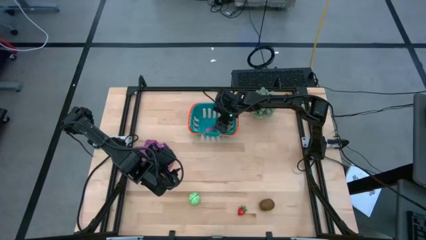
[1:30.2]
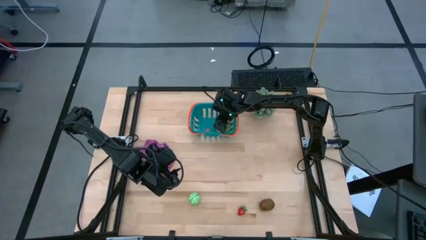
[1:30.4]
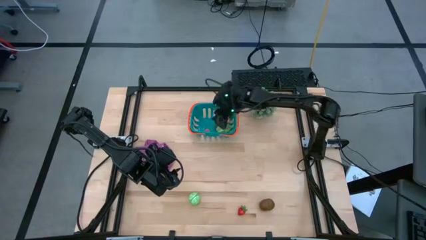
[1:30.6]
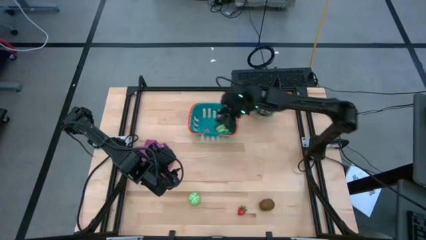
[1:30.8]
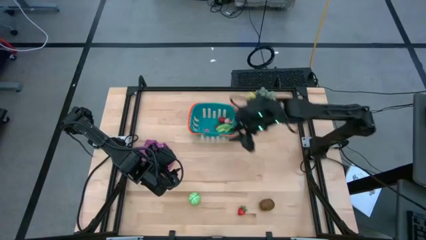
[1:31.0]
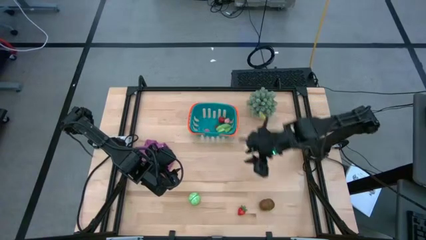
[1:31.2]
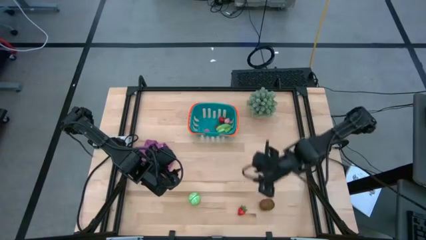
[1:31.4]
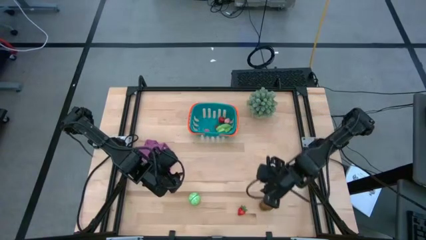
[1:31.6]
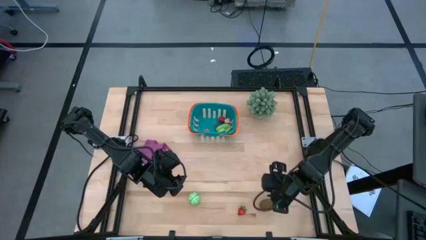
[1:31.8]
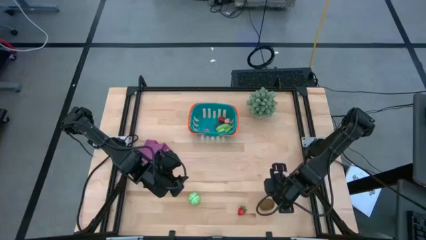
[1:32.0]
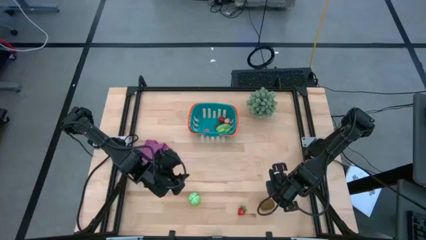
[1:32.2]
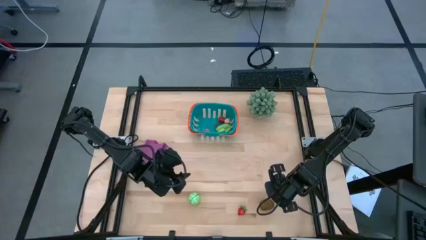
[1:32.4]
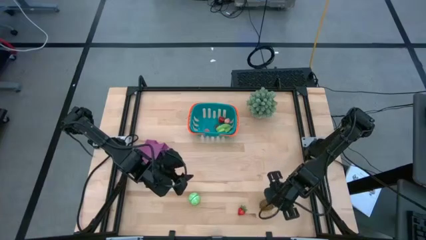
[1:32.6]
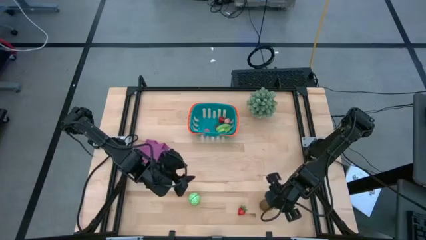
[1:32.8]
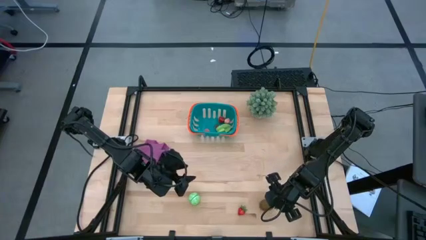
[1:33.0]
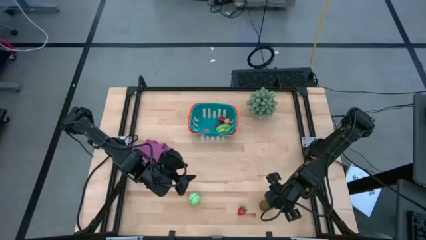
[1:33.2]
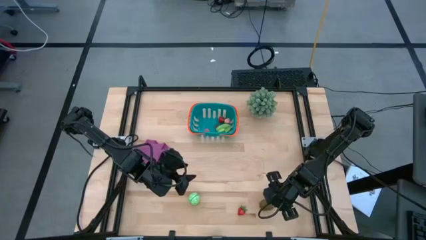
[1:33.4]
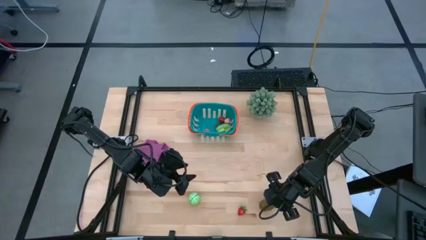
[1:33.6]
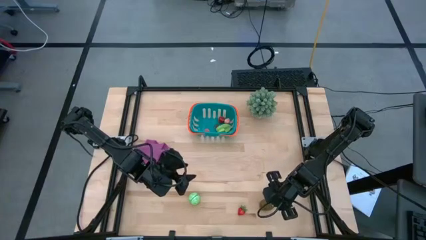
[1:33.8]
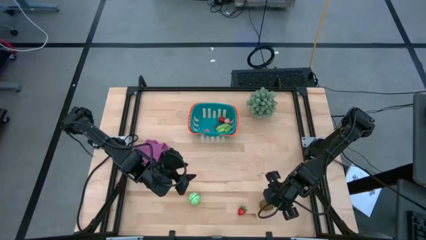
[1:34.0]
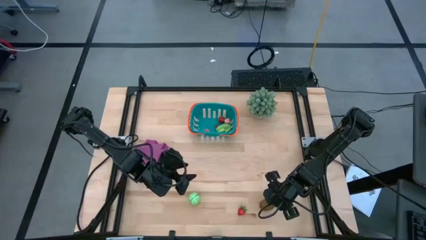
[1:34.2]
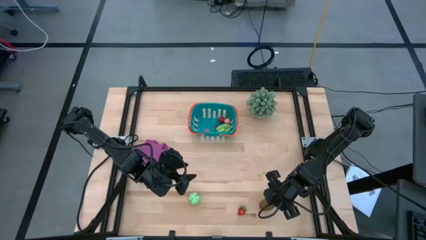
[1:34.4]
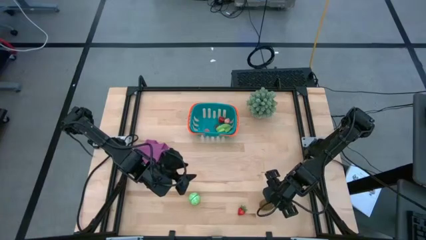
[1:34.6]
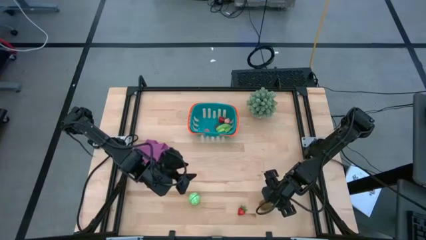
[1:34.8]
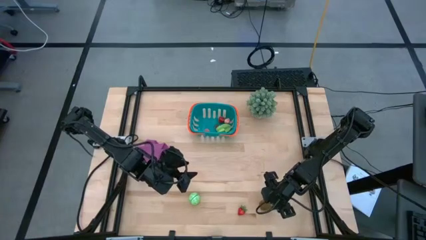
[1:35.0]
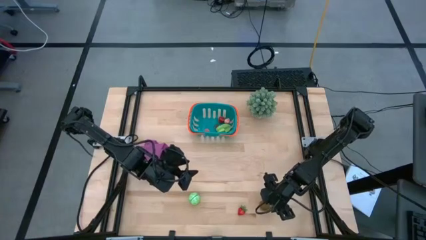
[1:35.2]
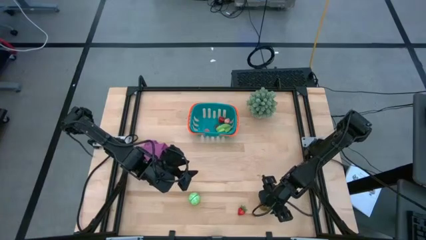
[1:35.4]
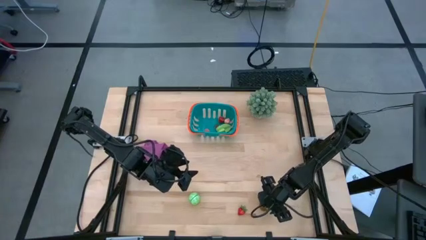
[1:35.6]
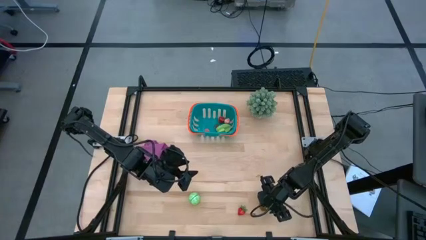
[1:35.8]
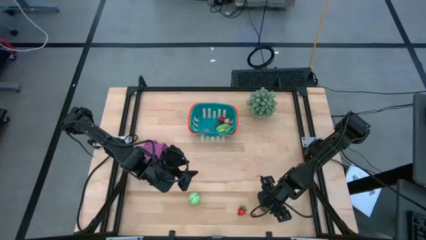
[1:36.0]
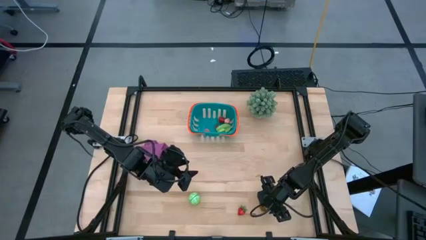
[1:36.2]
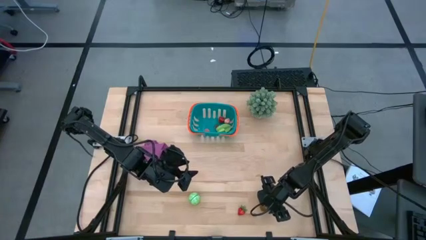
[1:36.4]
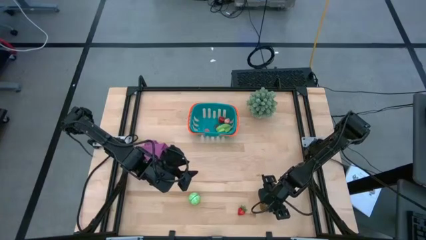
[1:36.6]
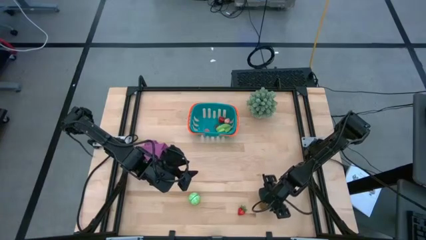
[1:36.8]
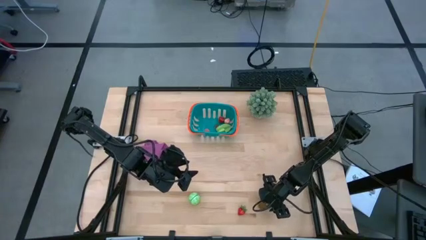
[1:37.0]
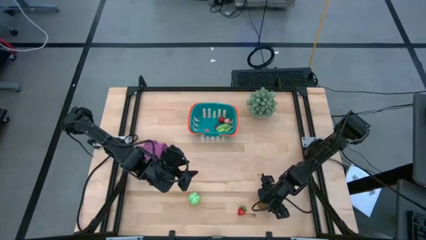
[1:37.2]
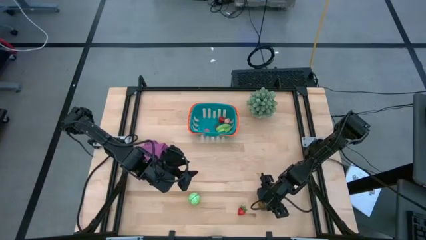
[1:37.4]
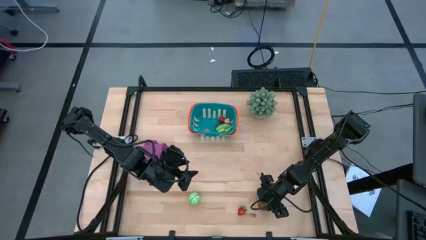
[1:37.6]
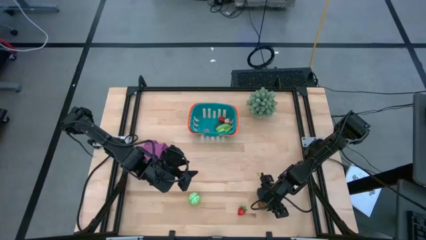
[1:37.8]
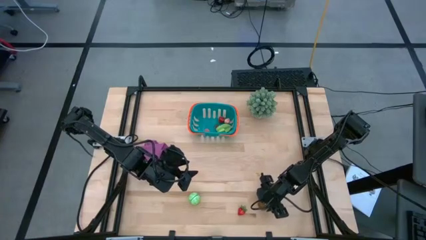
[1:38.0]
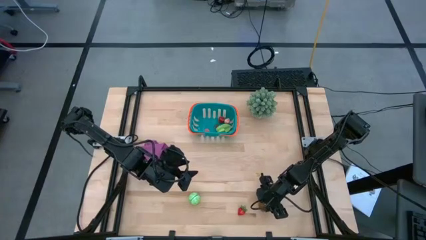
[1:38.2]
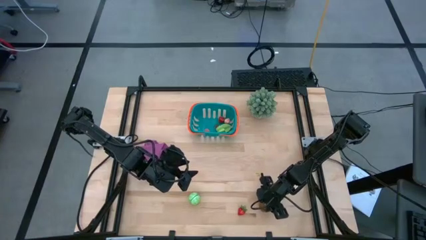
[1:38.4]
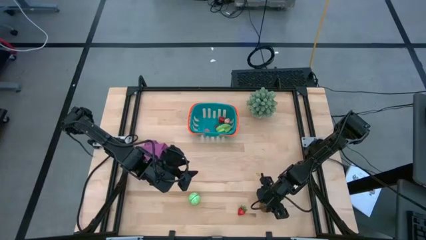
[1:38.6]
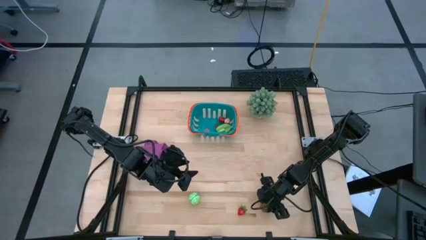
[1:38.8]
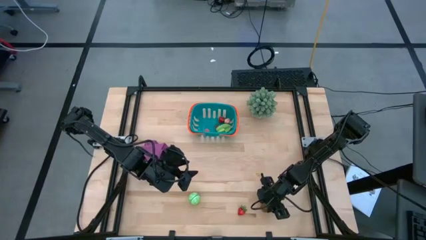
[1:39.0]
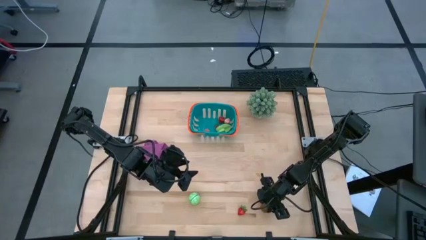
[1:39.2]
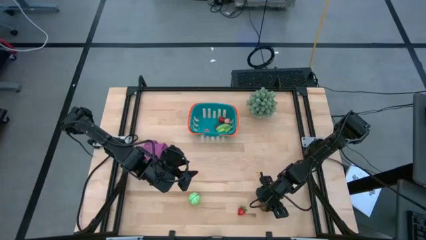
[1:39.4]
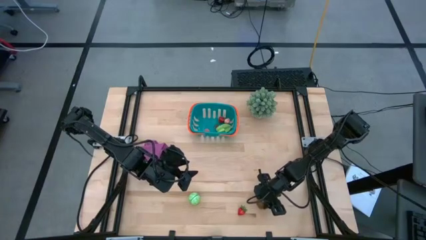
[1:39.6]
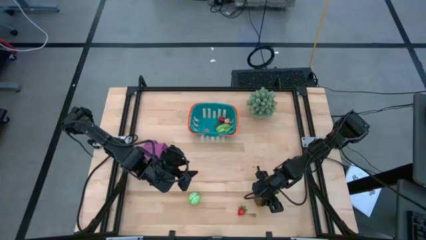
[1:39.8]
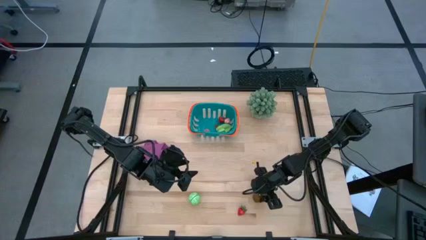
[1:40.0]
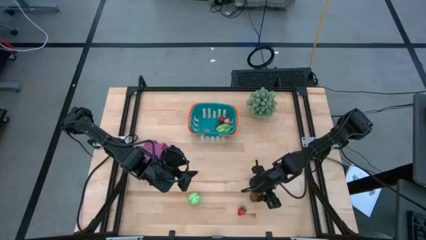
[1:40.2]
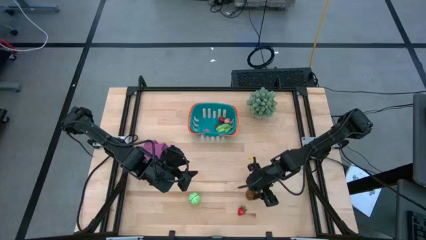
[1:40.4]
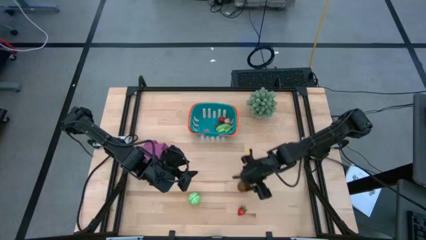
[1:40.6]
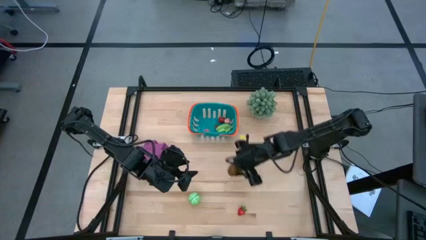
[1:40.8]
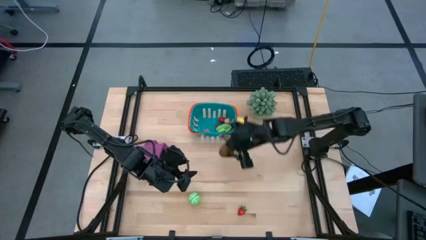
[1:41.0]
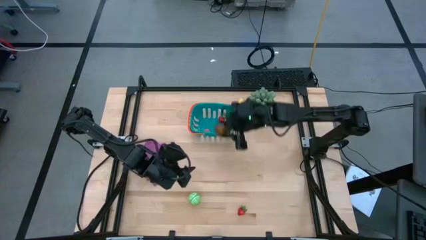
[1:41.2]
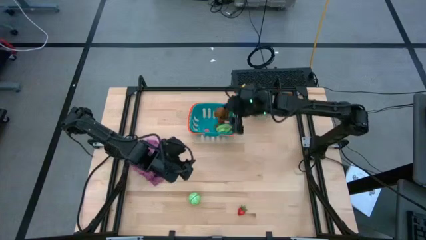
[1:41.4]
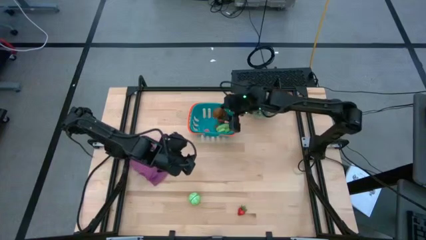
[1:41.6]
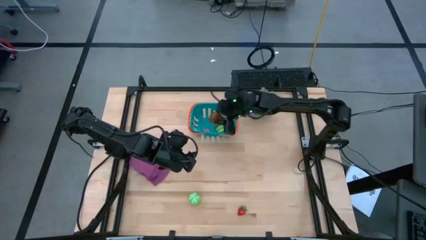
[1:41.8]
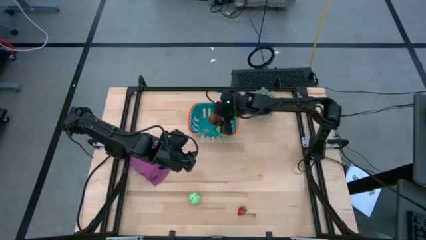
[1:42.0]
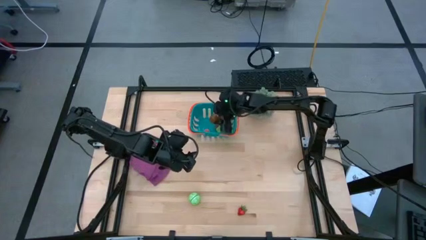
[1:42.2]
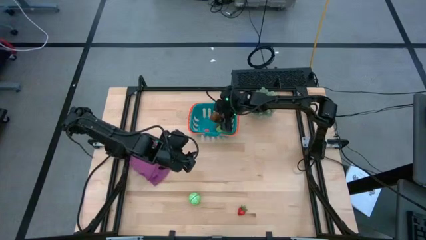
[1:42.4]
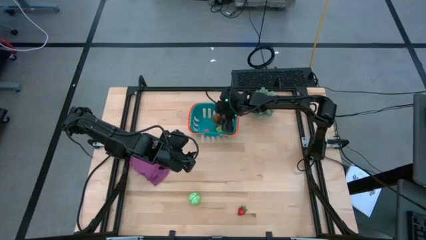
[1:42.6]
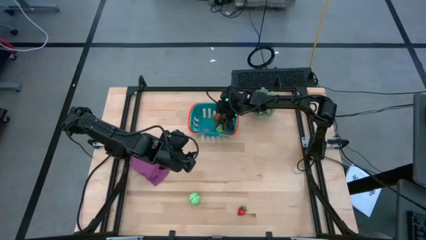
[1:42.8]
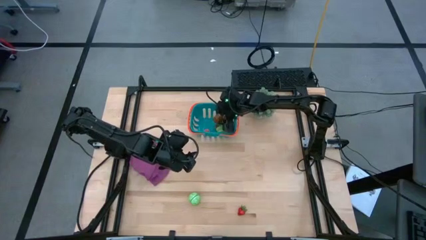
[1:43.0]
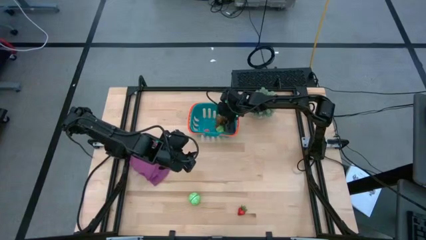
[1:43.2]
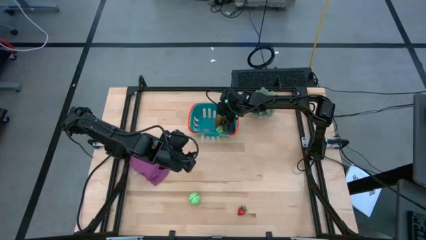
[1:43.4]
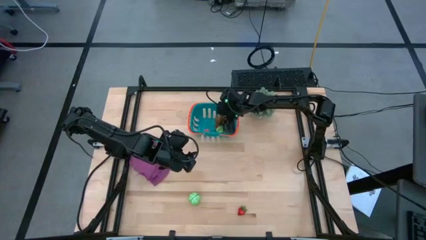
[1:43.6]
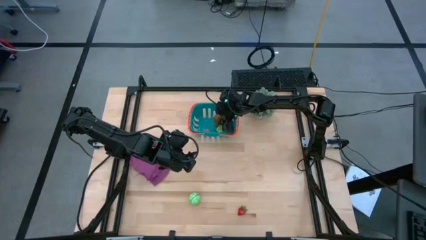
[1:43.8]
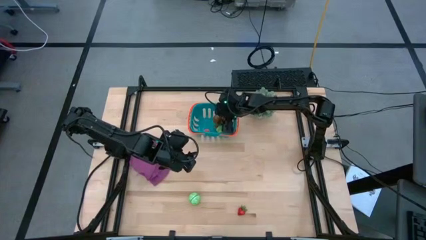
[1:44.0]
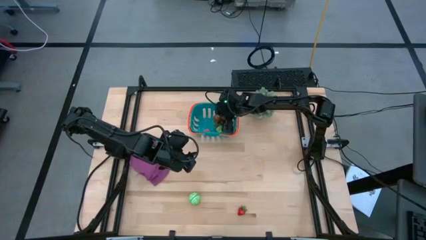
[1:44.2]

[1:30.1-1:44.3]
Task: Pick and placing Produce into tupperware
Put the brown kiwi into the blue basket
